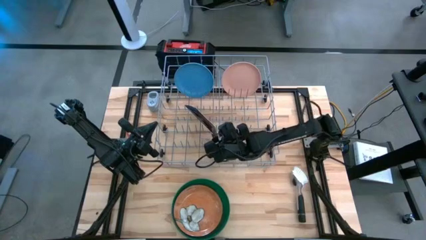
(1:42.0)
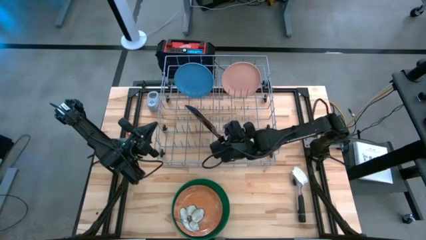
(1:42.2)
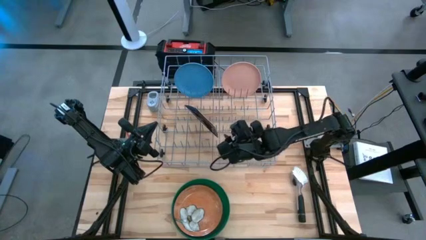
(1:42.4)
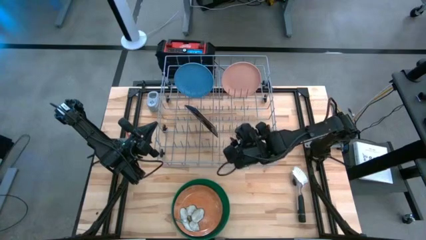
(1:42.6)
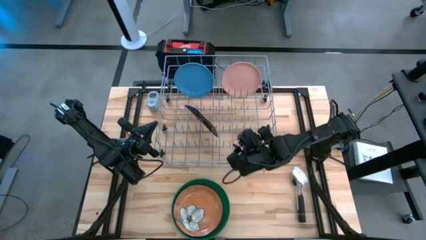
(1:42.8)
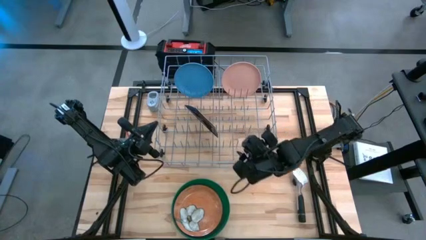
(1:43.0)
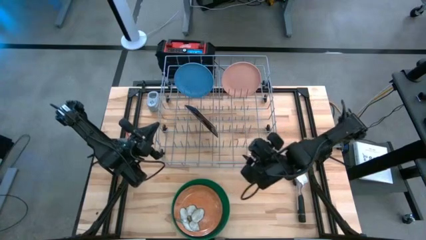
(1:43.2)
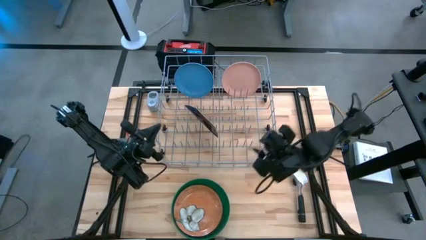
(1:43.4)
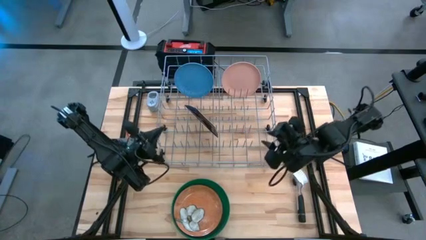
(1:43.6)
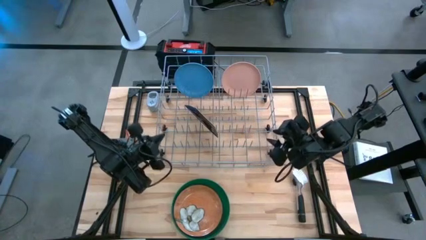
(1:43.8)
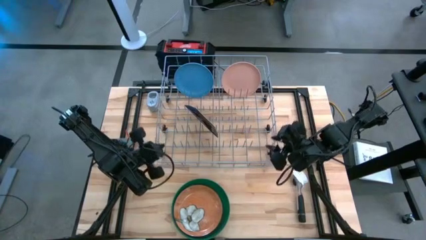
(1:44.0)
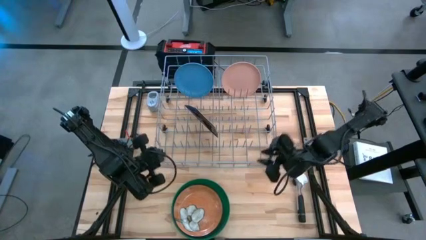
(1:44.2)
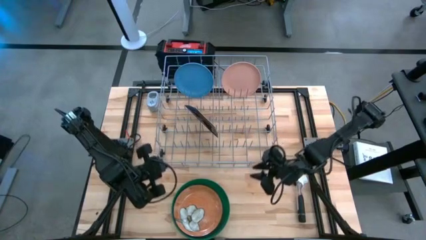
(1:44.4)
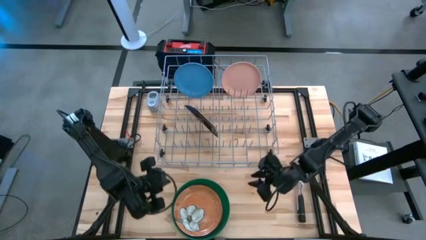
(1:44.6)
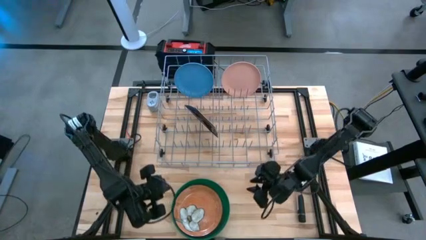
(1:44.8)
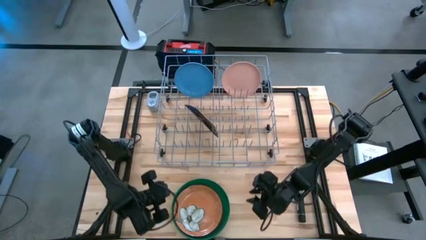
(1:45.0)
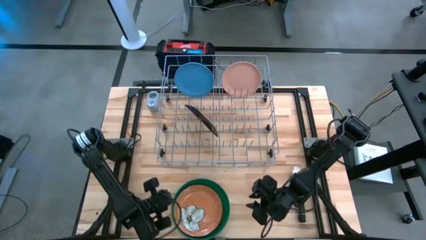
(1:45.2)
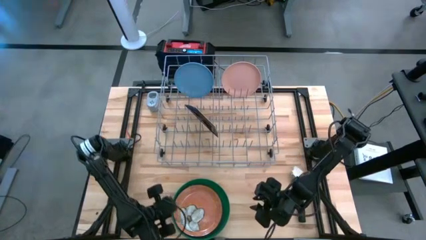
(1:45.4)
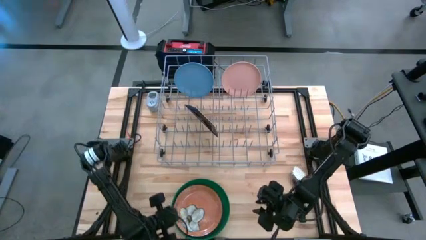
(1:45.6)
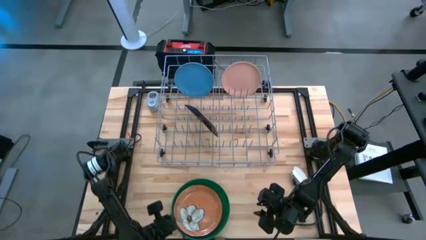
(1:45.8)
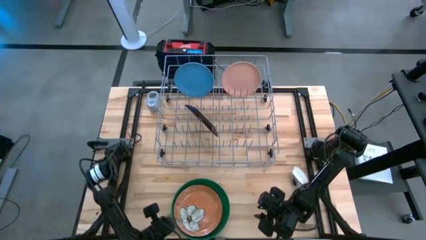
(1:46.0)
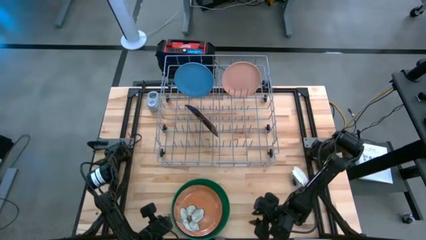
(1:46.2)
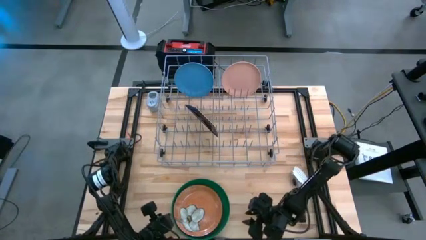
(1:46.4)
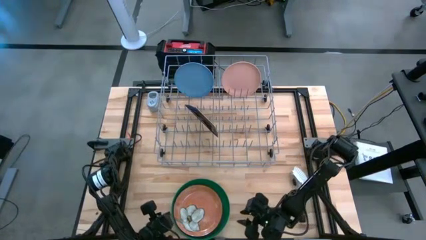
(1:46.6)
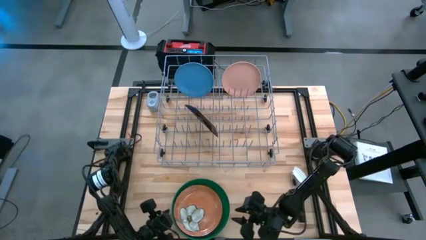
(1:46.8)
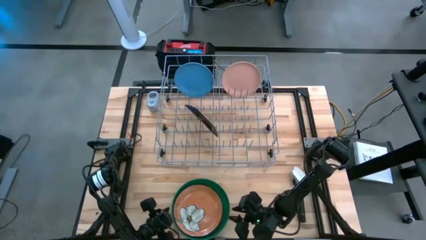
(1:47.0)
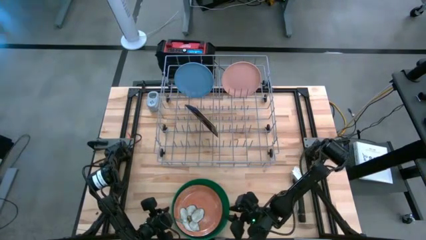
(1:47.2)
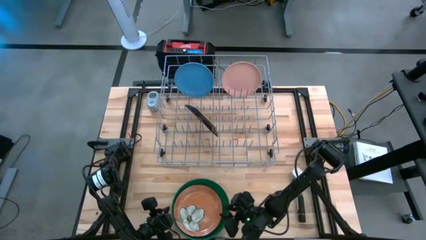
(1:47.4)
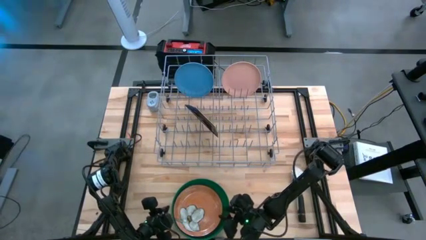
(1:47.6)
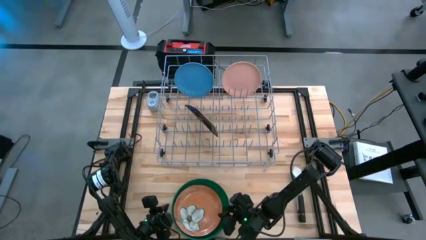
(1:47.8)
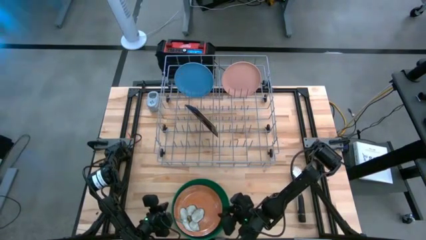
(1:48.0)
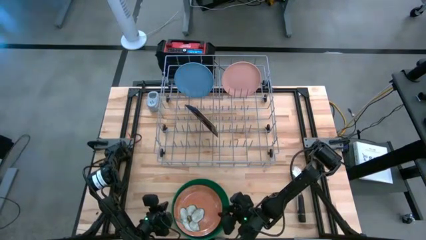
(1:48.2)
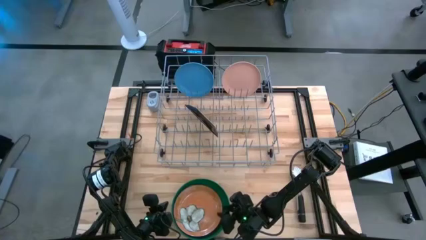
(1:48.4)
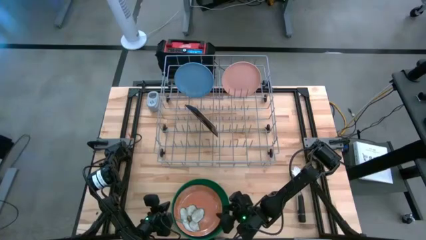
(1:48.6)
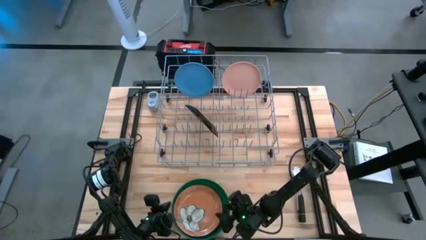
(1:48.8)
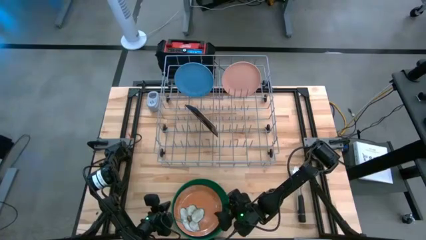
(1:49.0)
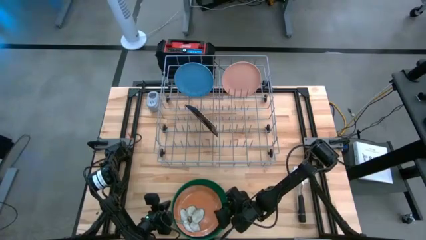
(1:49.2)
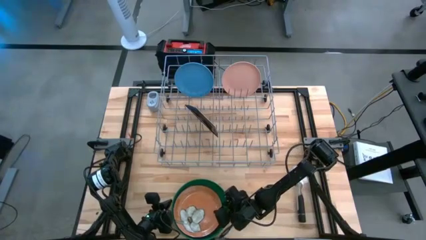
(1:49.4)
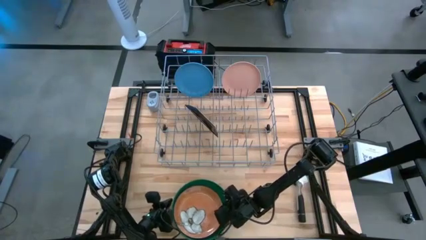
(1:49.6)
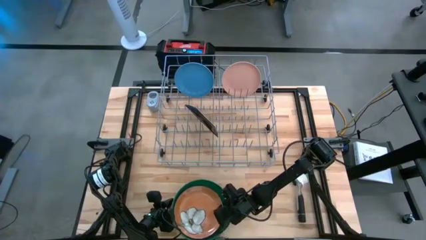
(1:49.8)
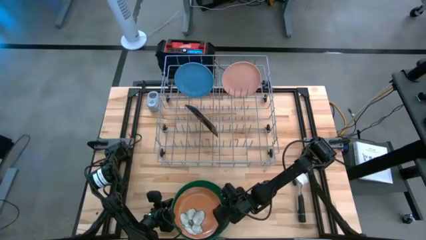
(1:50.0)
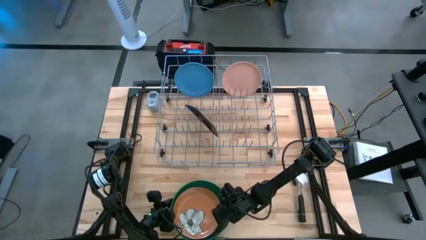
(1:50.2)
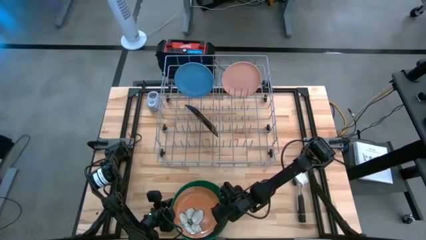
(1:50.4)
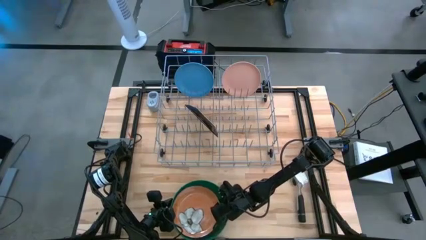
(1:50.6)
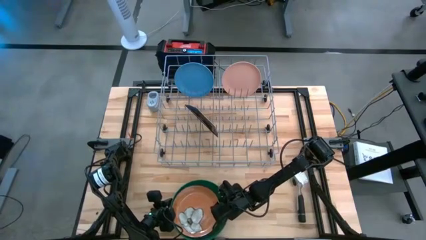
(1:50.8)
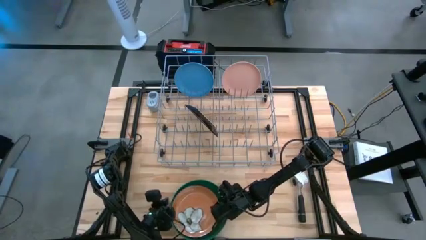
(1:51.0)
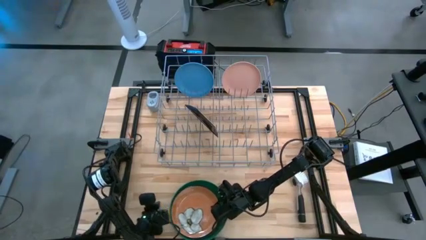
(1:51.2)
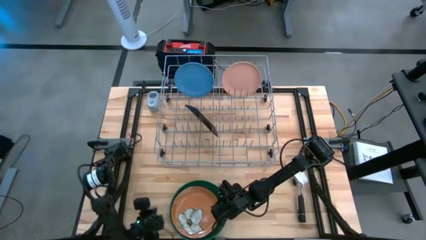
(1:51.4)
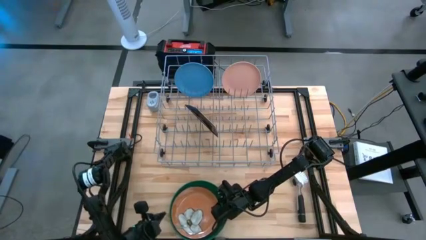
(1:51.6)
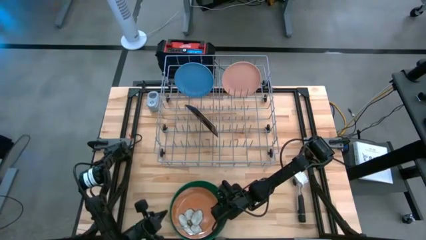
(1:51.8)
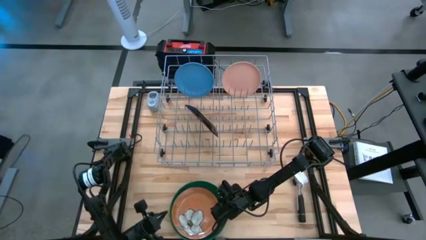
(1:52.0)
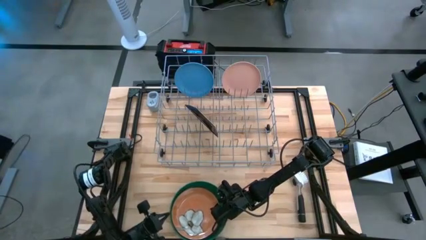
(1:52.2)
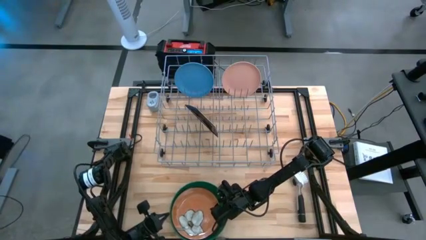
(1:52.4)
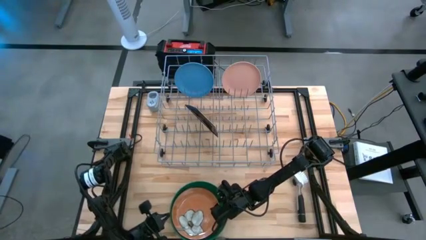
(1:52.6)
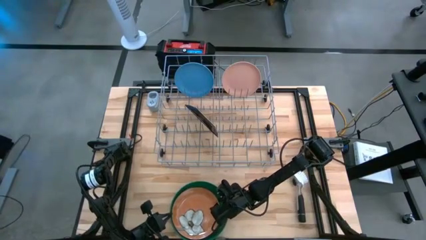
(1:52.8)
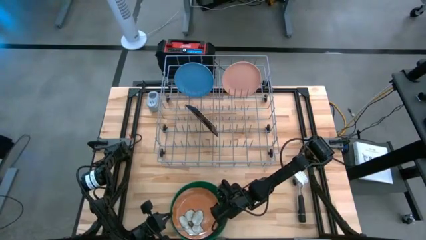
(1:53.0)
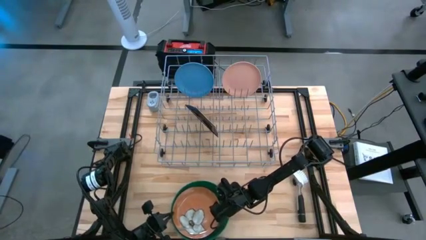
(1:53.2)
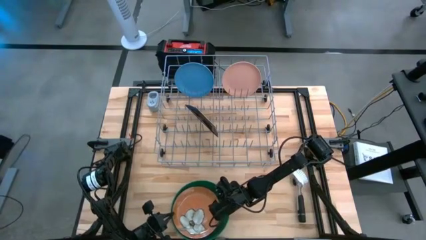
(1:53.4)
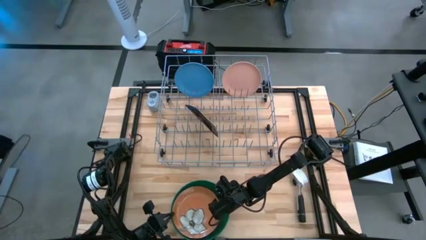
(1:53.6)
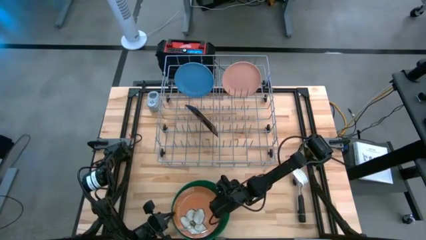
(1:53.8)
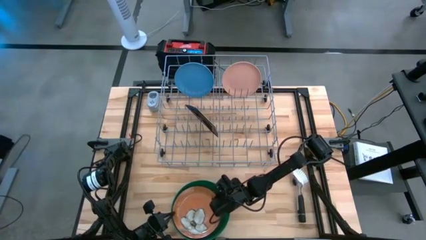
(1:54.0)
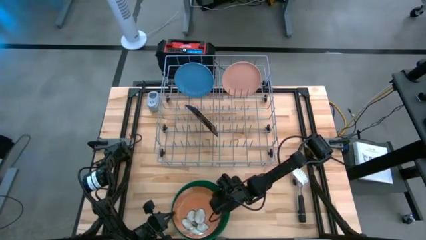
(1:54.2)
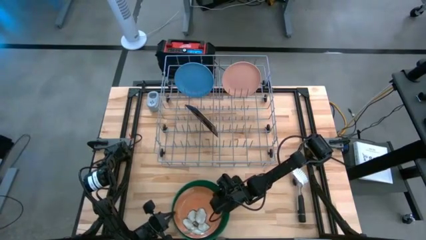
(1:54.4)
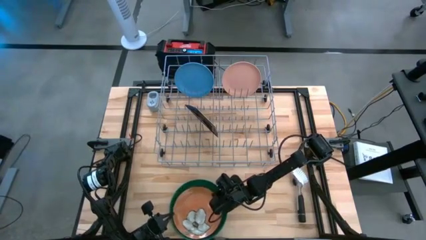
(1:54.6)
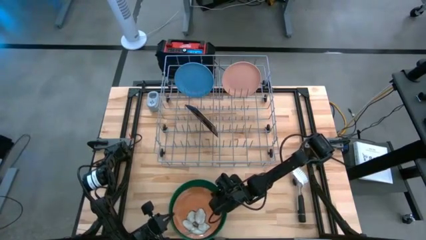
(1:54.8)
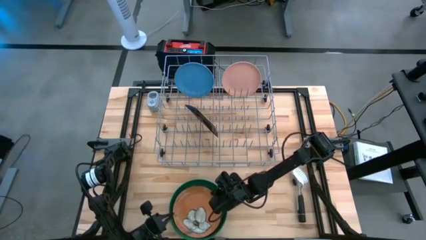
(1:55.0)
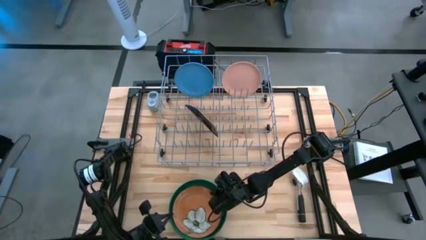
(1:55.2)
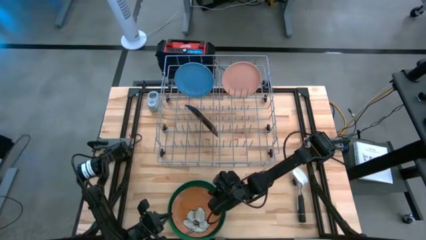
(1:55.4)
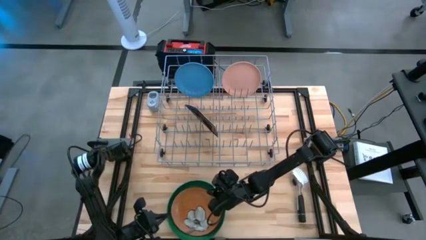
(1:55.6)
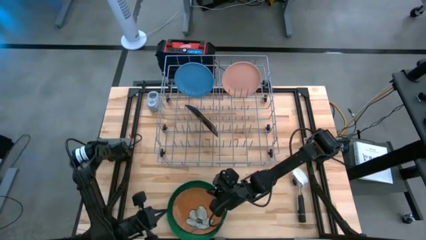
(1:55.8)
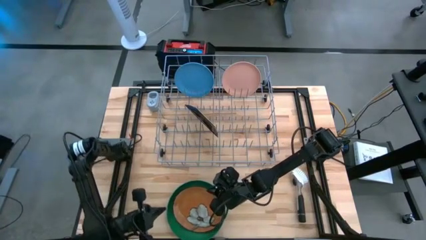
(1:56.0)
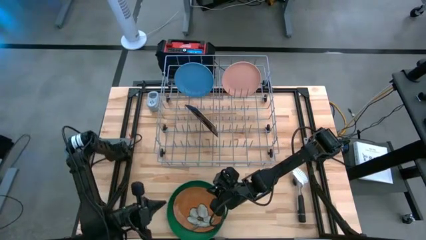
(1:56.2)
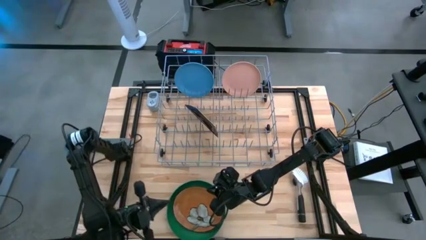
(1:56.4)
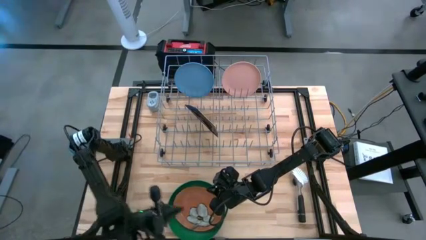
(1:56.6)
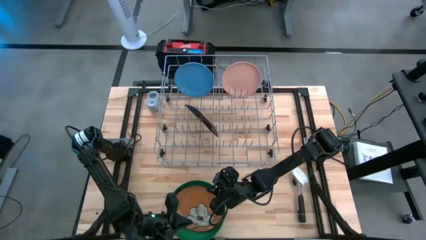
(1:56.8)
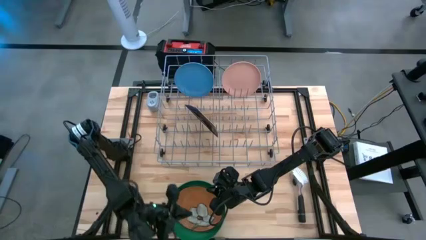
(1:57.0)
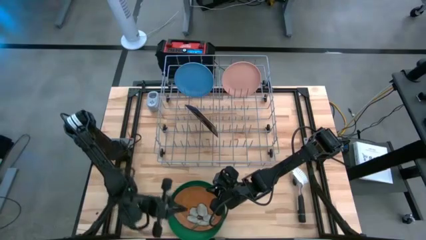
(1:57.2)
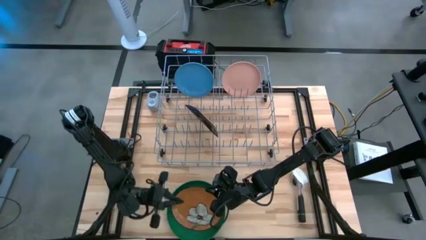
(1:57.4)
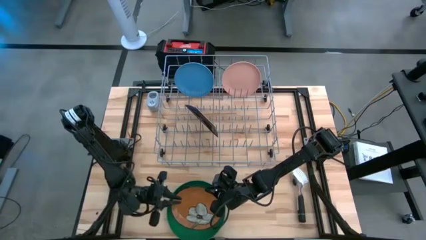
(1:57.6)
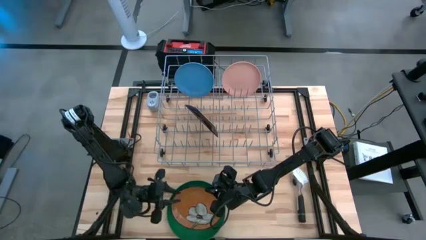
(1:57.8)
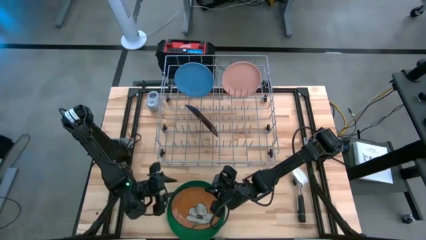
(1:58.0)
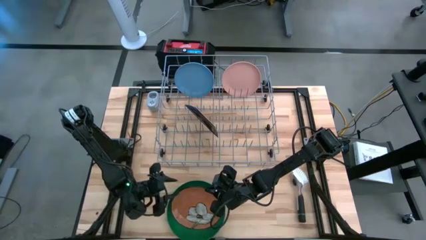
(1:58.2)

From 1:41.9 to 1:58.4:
Task: Sort dishes
Put the orange floral plate into the dish rack

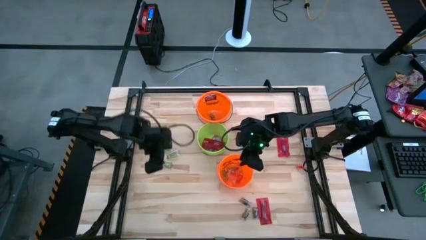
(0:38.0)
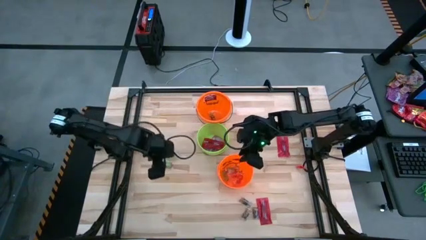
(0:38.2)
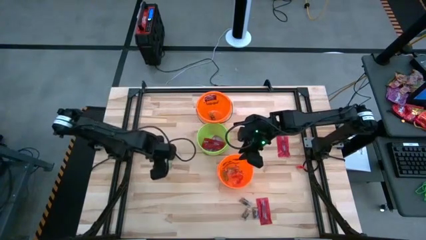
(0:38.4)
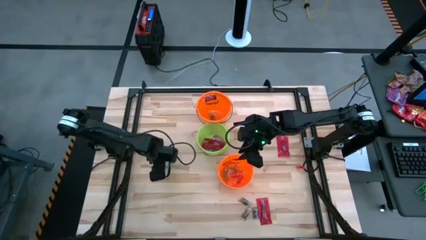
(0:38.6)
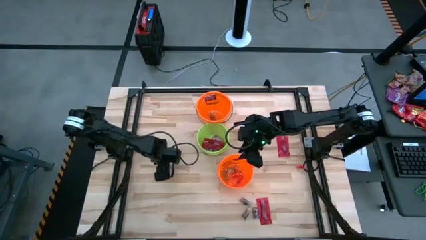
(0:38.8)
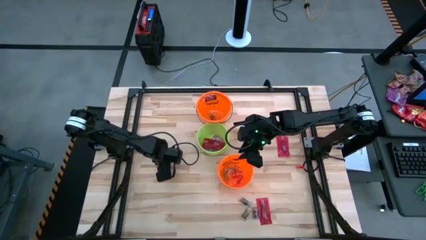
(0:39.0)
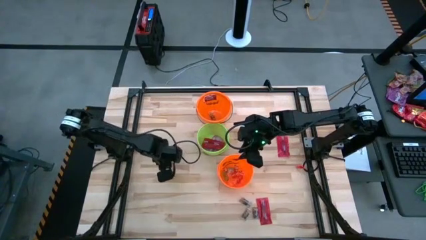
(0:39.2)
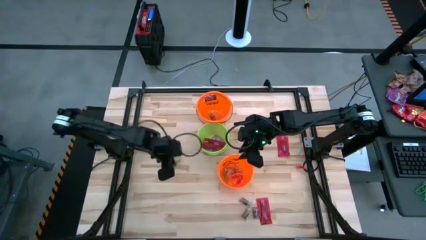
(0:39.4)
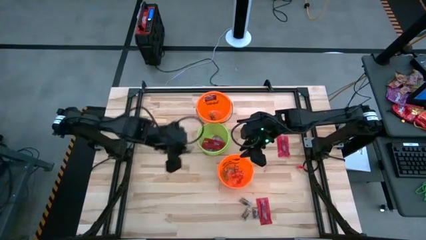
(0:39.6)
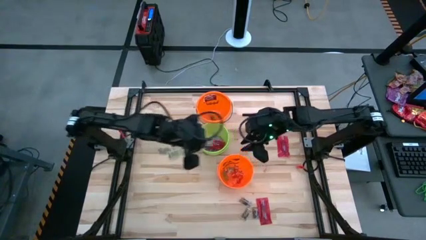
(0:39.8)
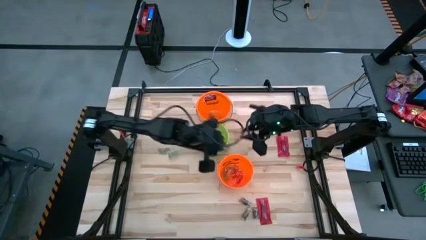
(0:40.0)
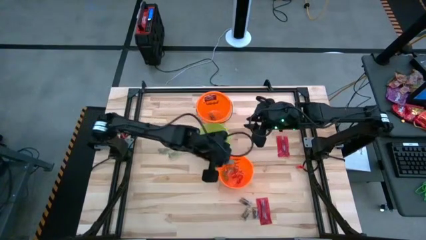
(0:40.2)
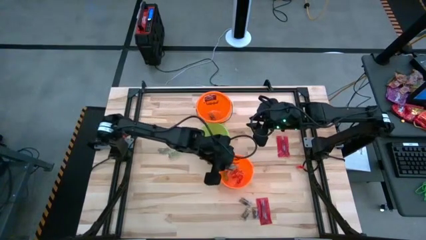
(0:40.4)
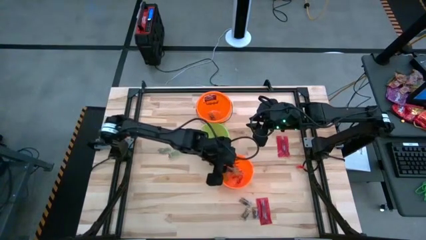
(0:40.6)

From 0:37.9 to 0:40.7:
Task: Sort candy by brand, put in halloween buckets
Put the green gummy into the bottom orange bucket
